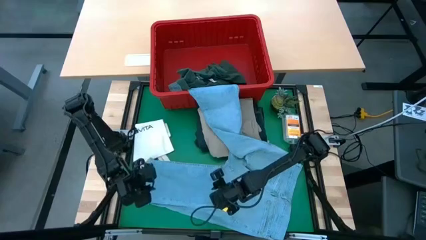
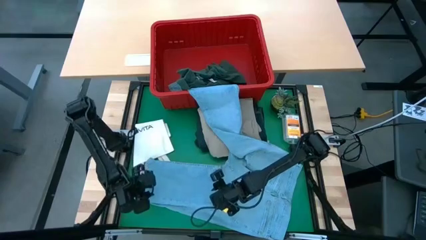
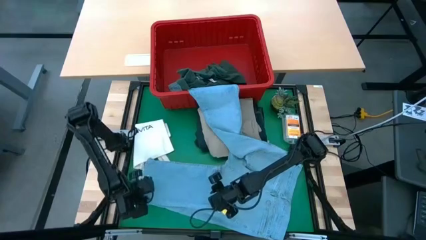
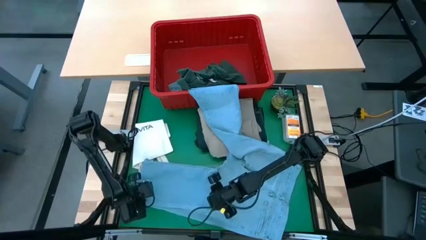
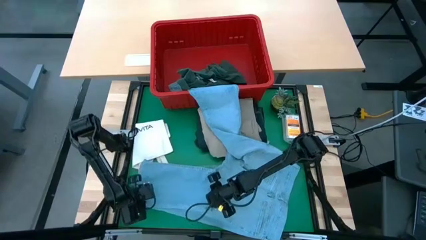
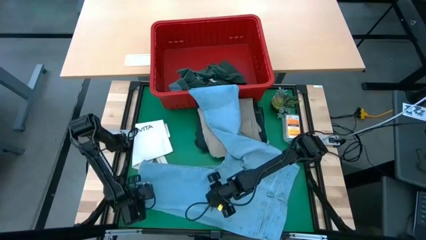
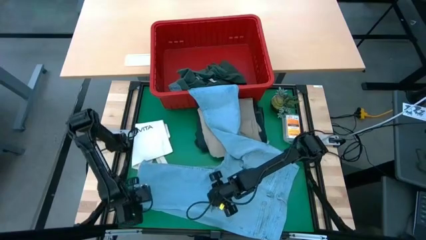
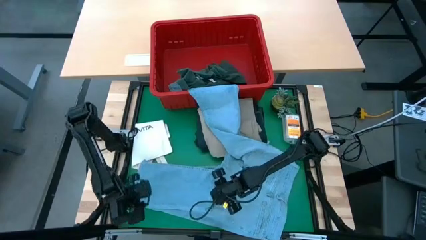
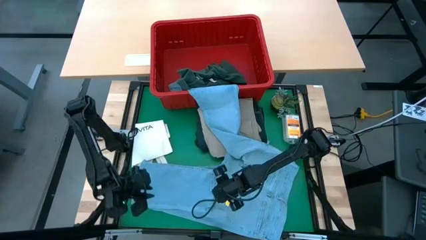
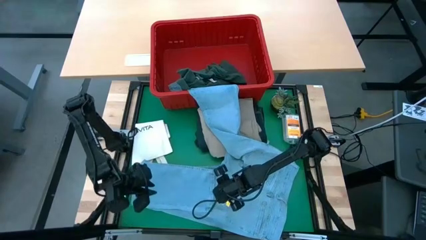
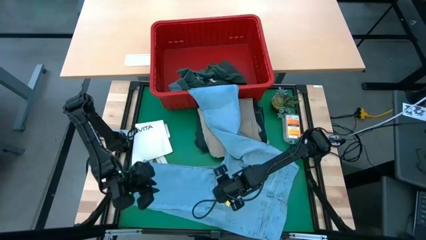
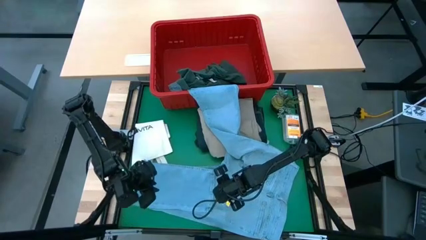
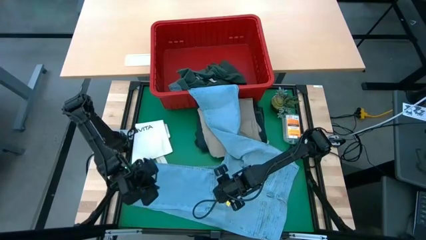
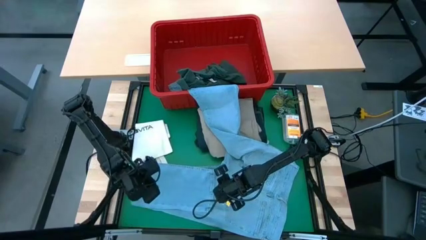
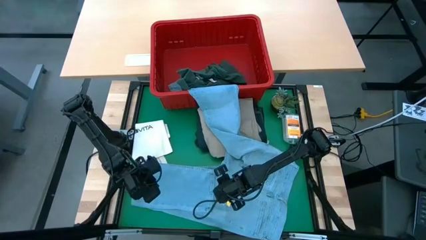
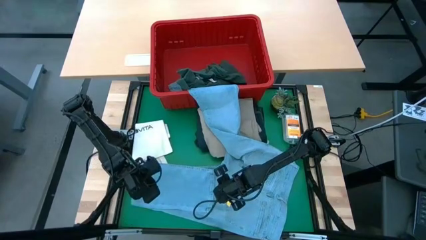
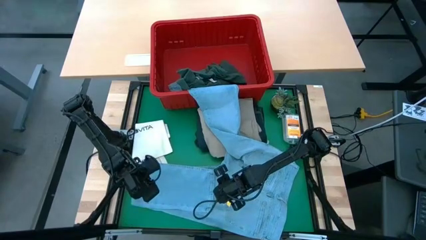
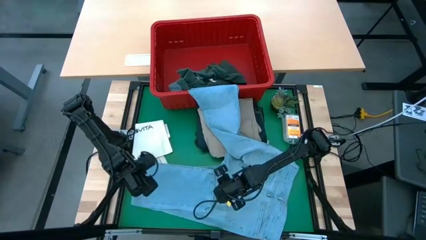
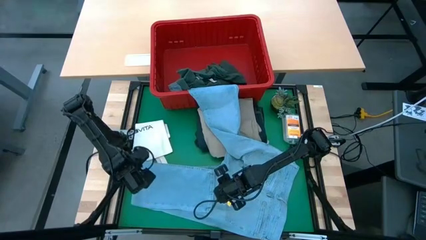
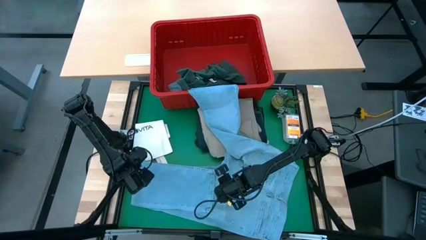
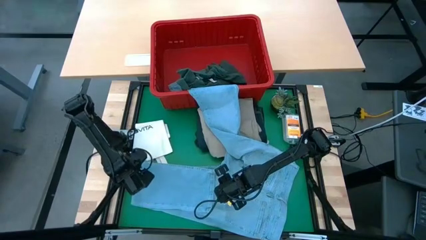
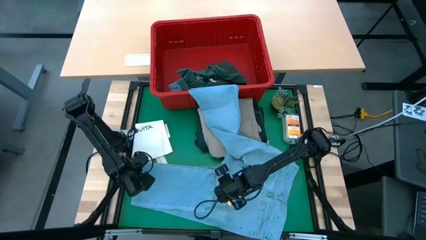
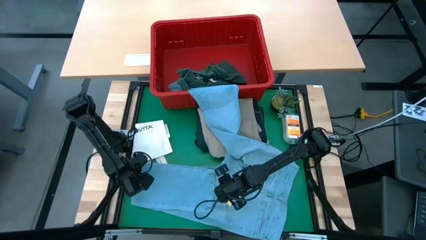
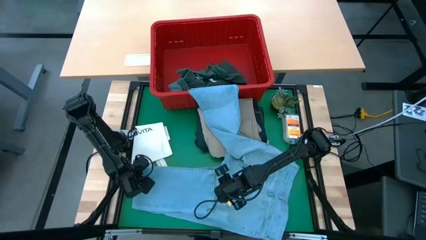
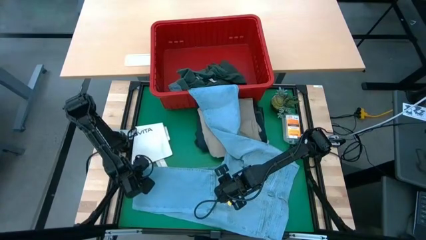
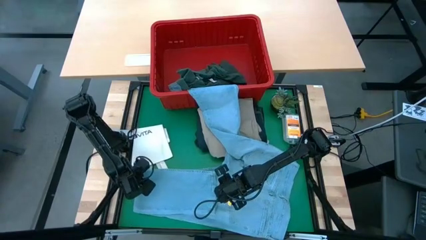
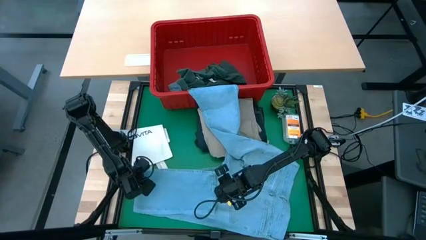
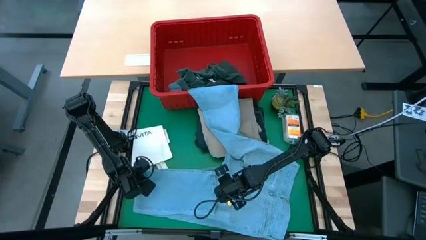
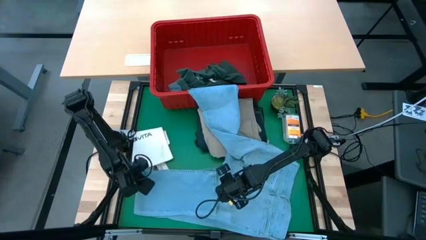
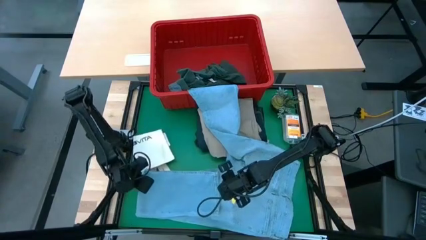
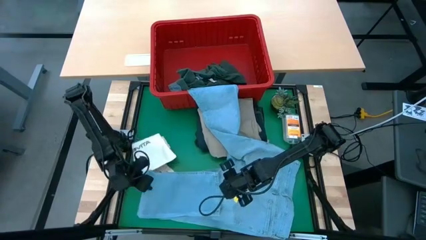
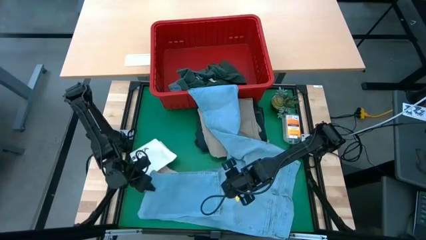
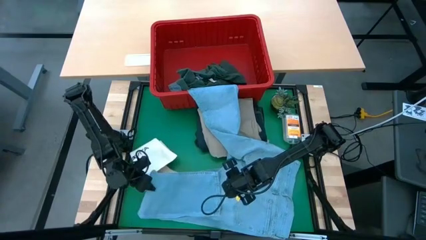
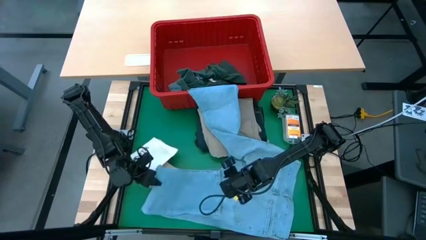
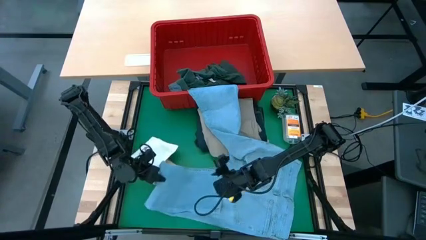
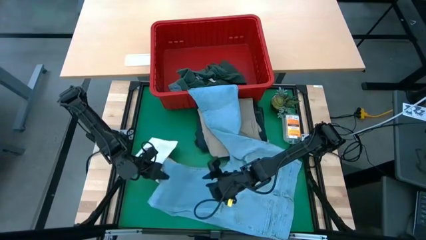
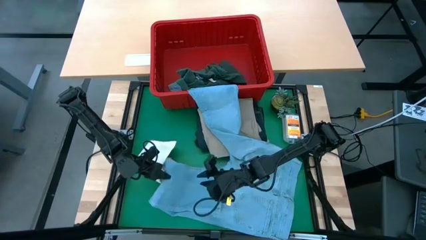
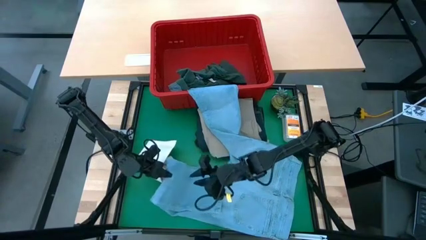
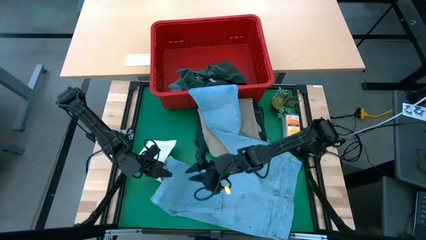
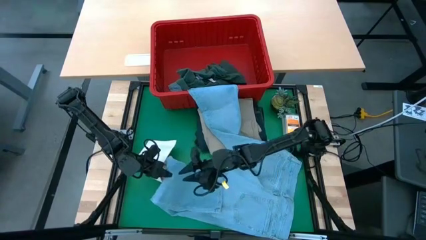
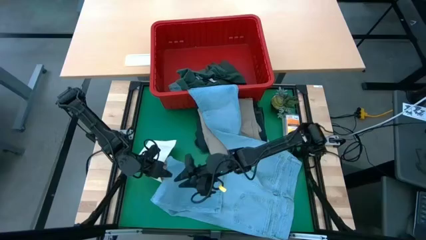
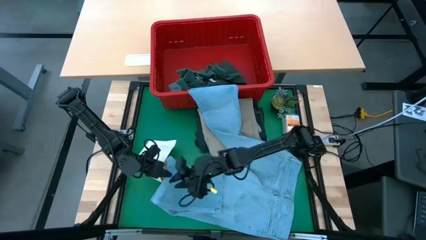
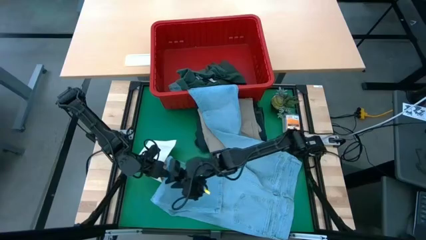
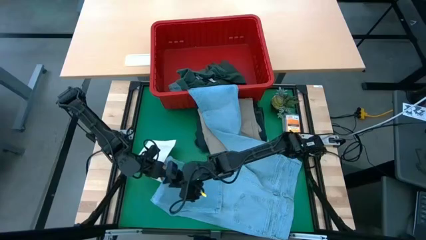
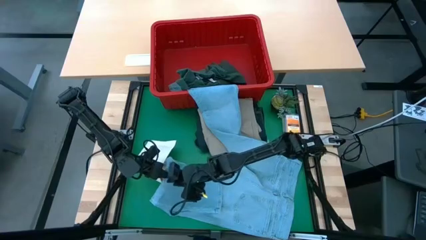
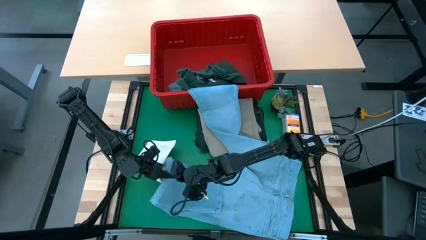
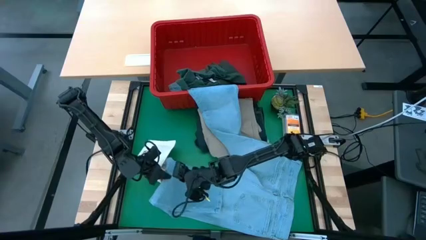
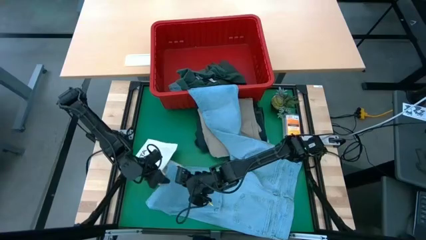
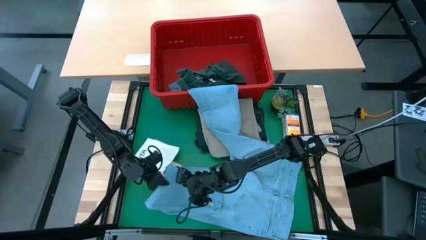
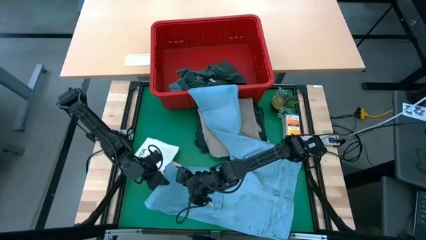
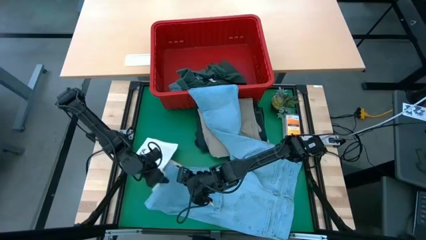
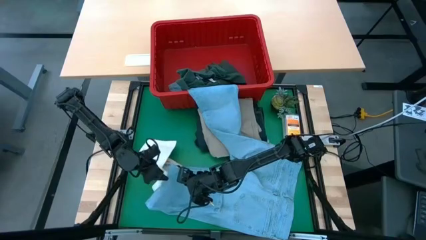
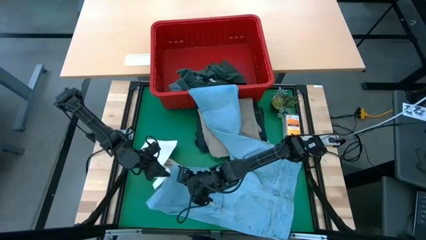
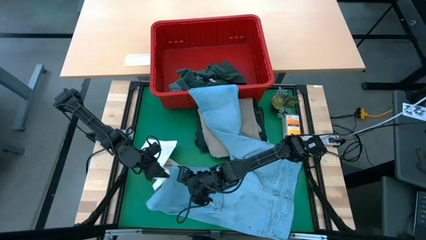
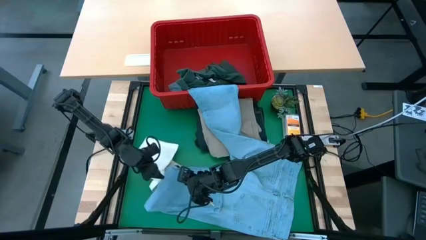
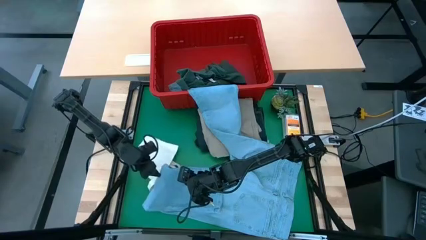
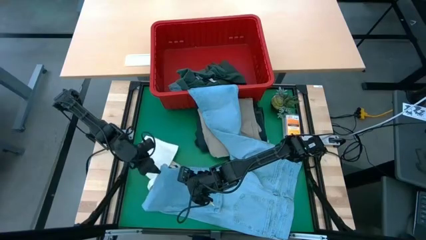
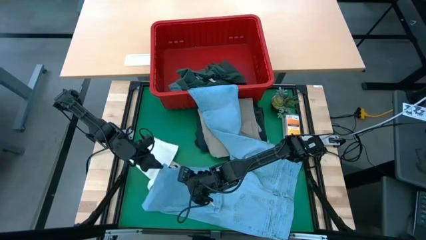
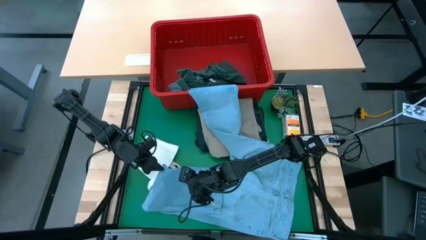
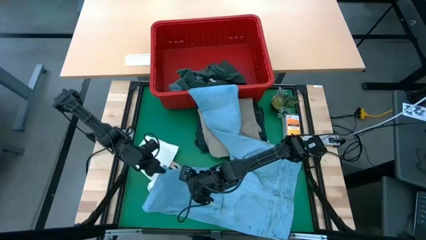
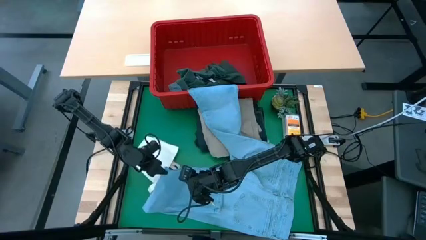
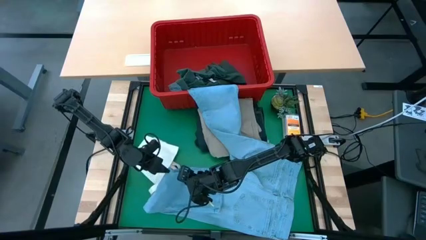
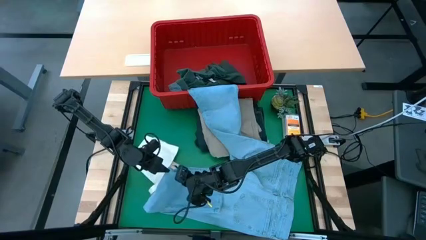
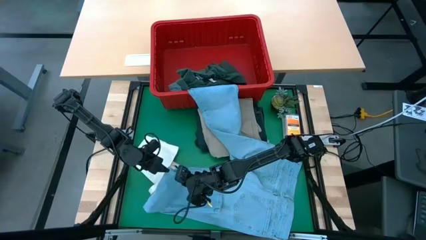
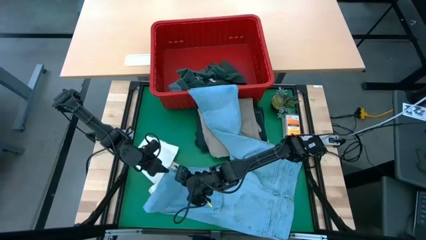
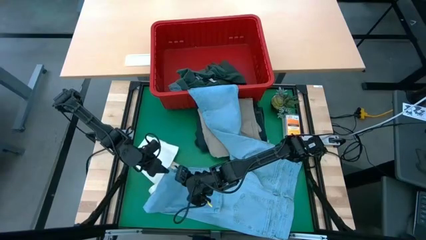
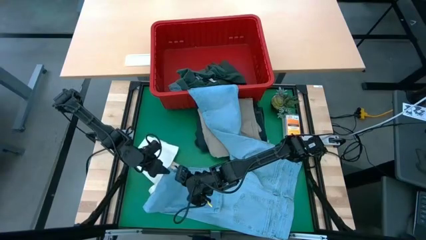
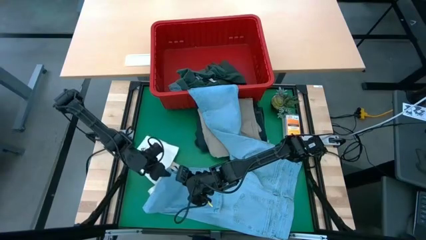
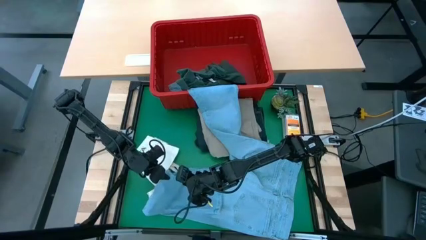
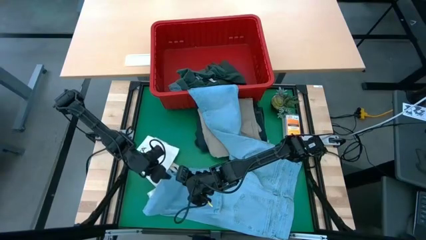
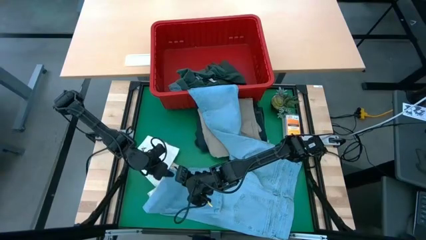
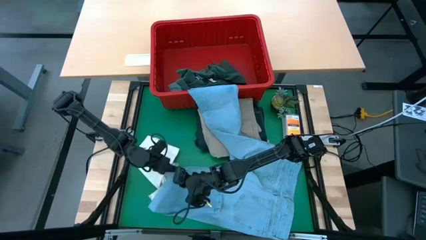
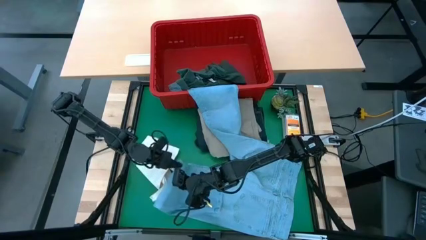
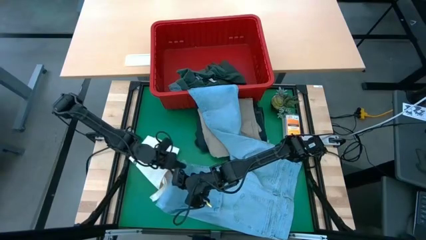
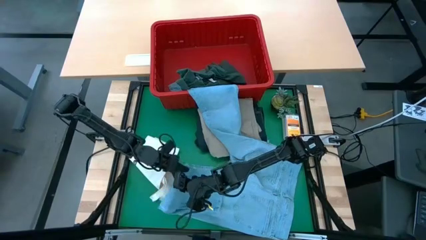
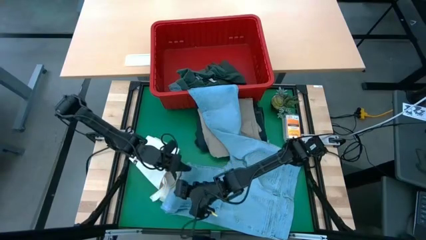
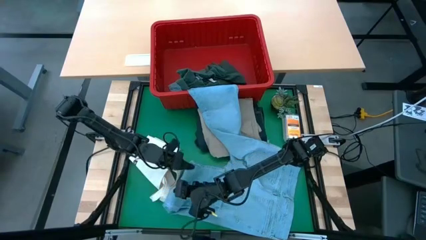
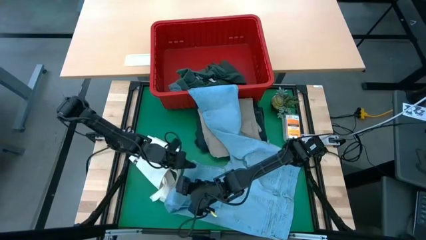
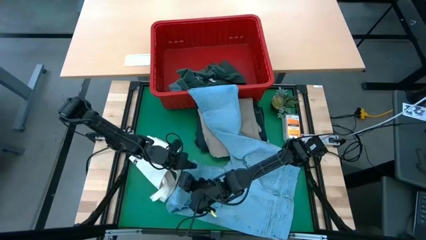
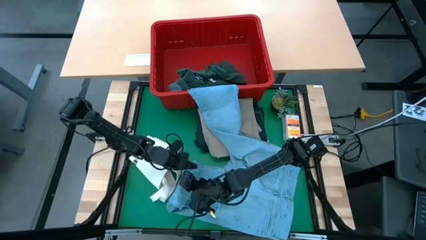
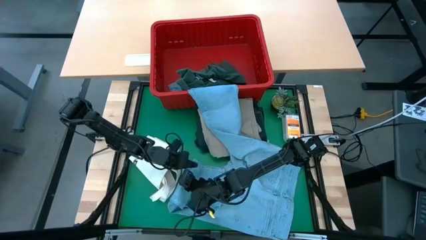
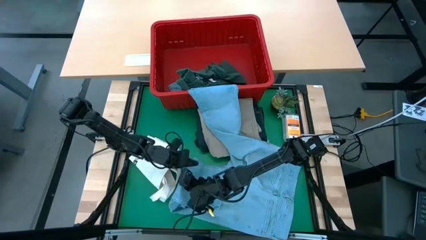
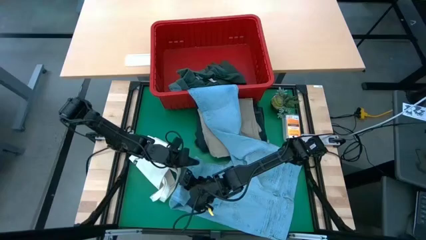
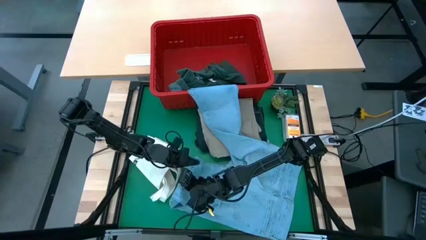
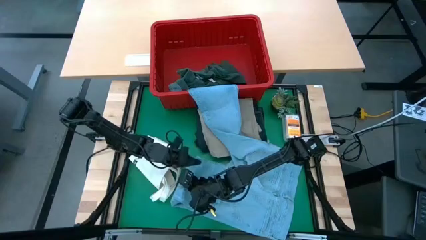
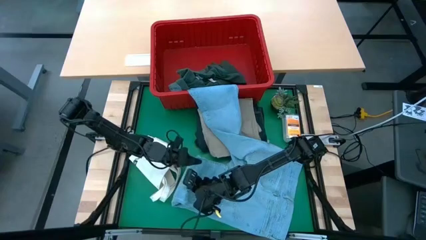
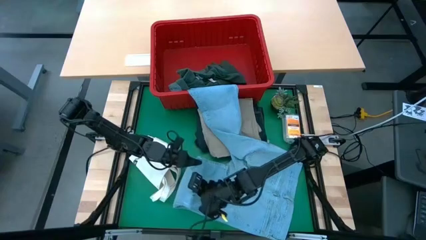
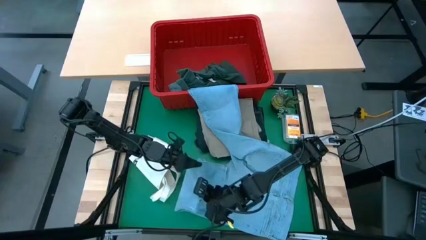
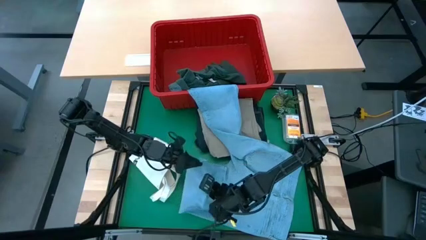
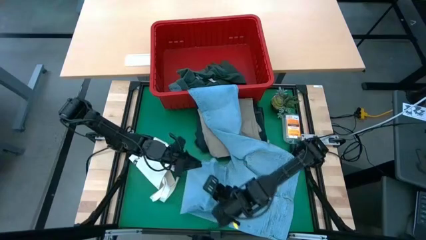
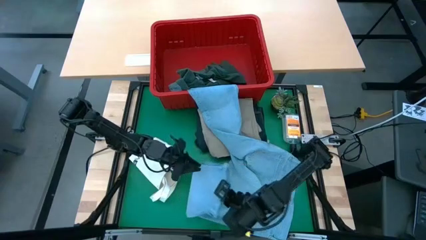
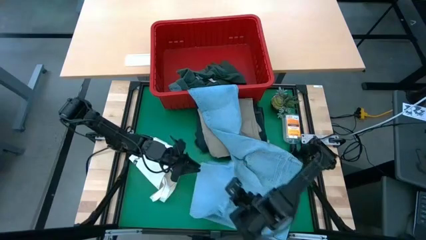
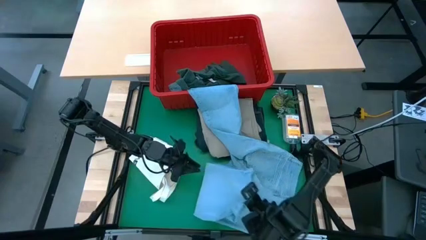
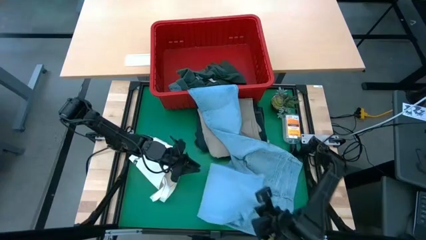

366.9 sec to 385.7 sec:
Task: Fold laundry
Remove the blue pants from the laundry bin
